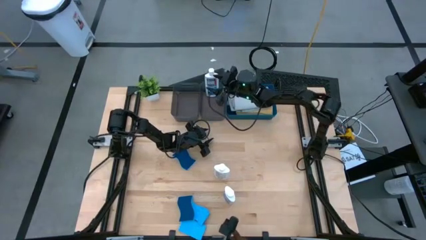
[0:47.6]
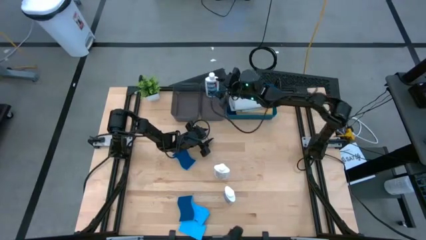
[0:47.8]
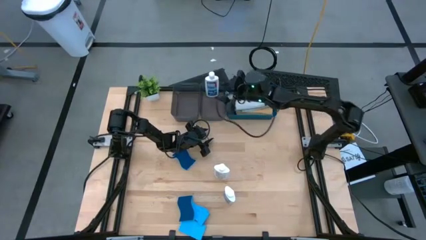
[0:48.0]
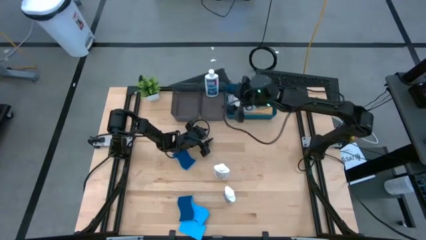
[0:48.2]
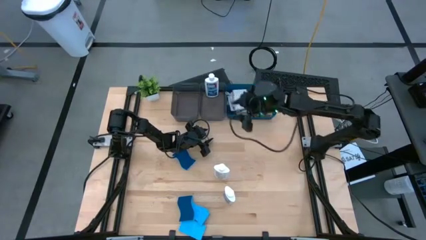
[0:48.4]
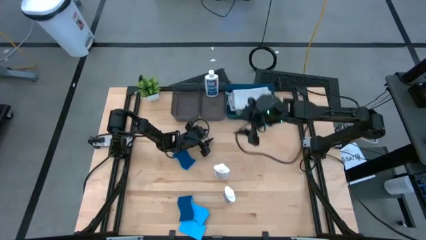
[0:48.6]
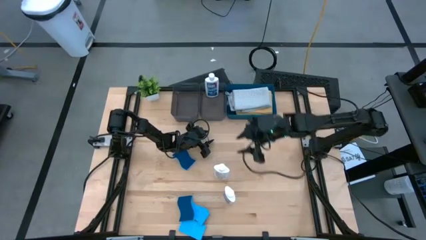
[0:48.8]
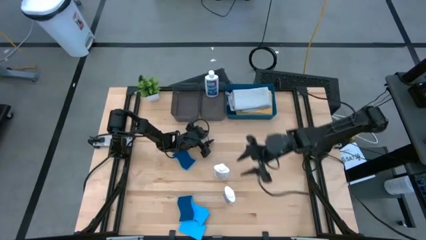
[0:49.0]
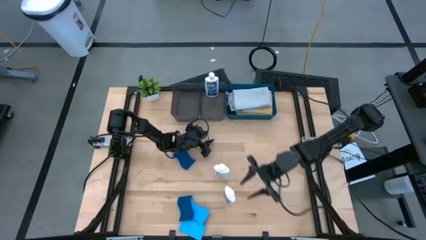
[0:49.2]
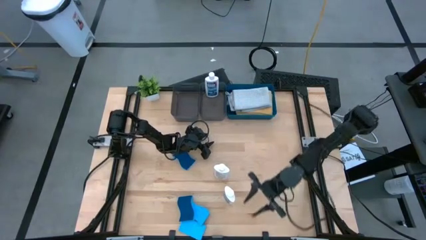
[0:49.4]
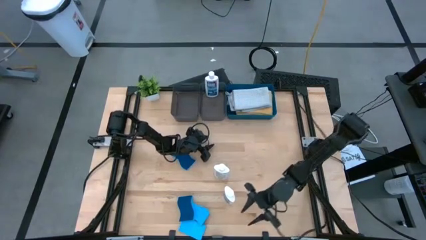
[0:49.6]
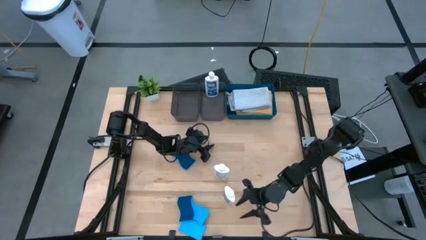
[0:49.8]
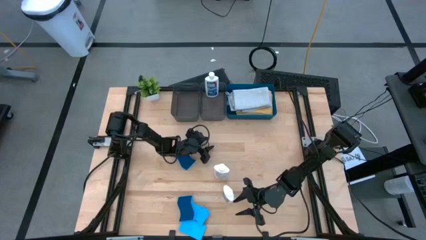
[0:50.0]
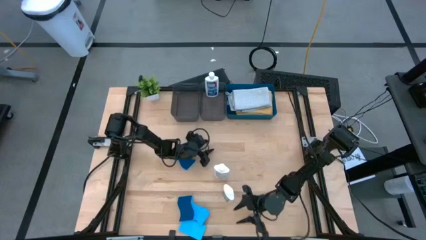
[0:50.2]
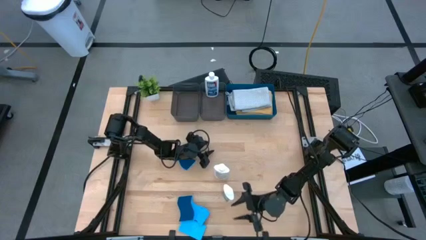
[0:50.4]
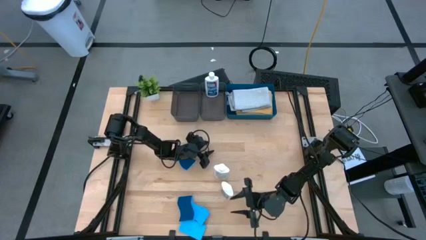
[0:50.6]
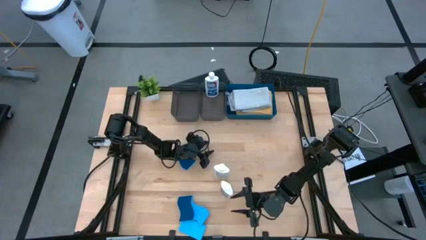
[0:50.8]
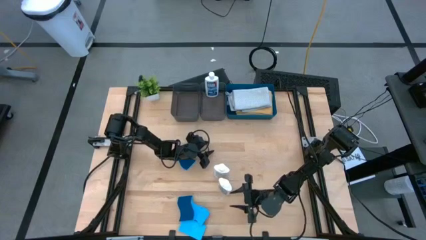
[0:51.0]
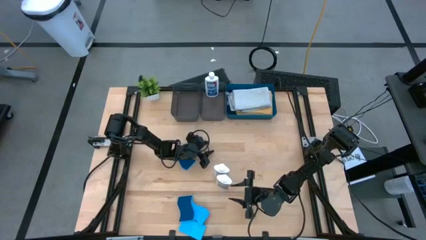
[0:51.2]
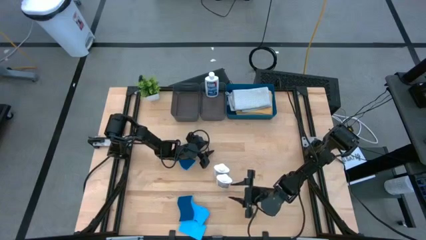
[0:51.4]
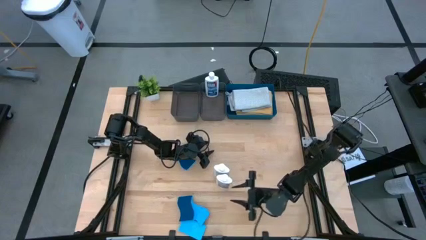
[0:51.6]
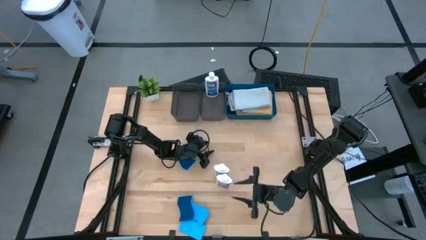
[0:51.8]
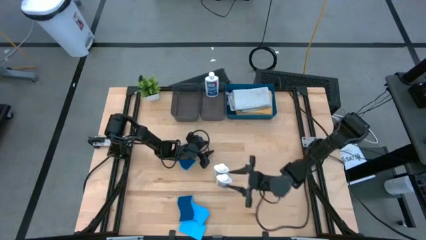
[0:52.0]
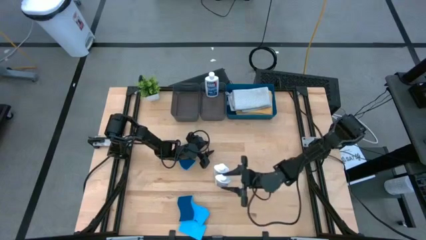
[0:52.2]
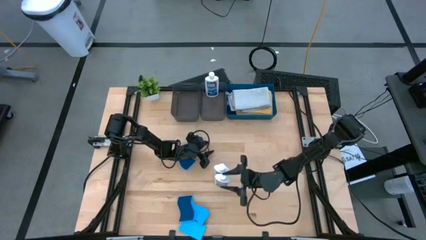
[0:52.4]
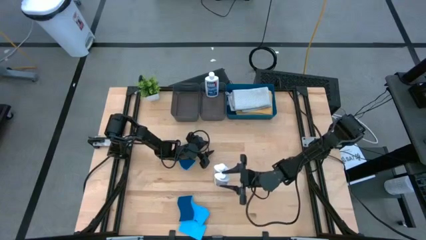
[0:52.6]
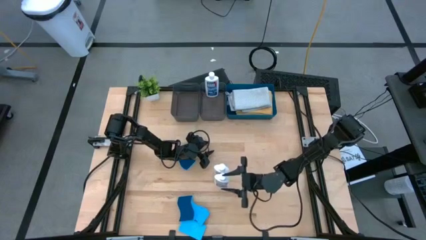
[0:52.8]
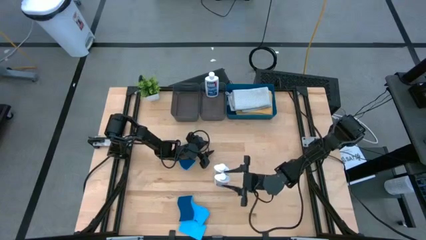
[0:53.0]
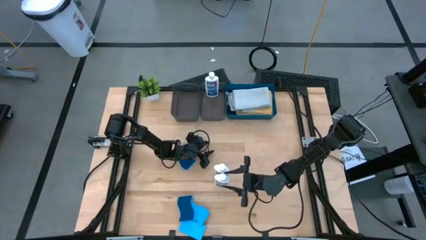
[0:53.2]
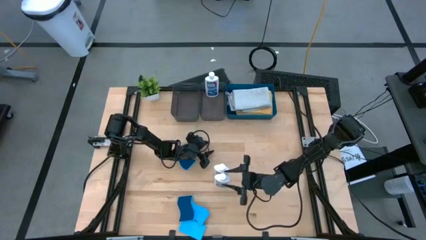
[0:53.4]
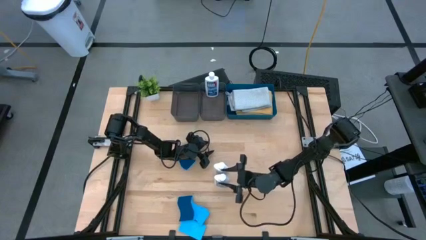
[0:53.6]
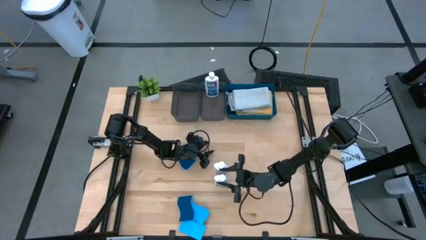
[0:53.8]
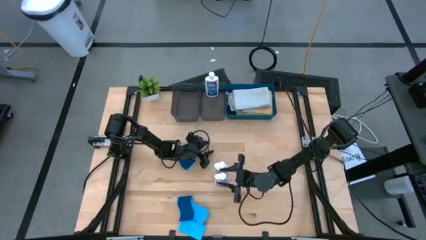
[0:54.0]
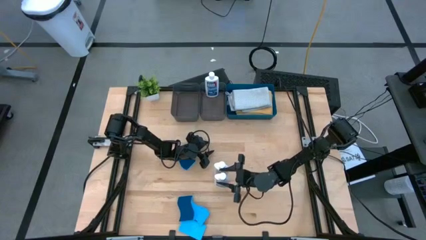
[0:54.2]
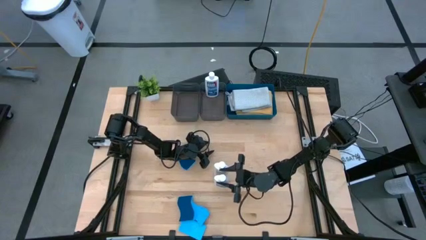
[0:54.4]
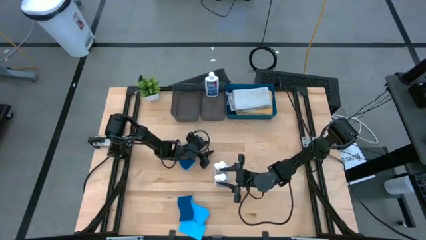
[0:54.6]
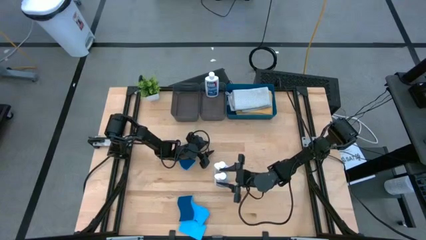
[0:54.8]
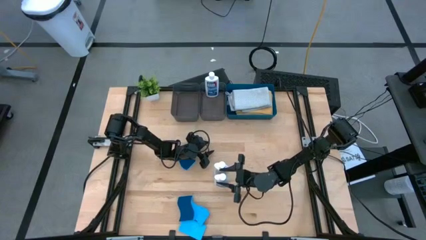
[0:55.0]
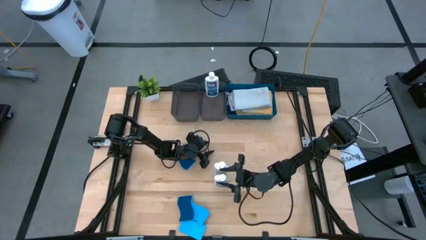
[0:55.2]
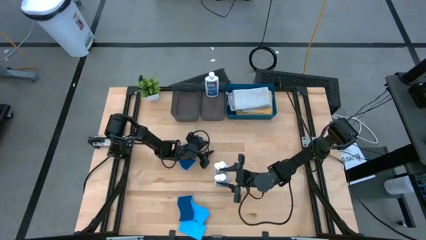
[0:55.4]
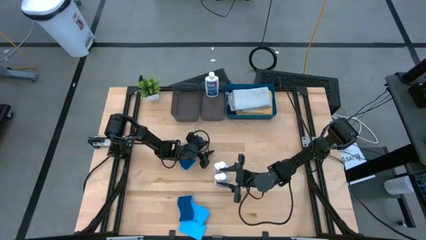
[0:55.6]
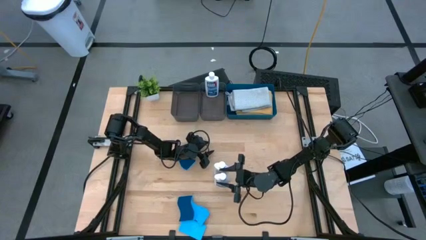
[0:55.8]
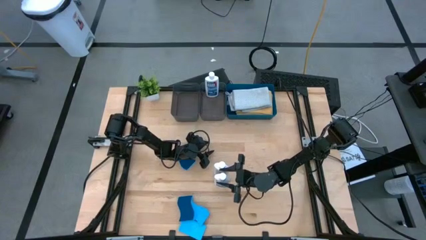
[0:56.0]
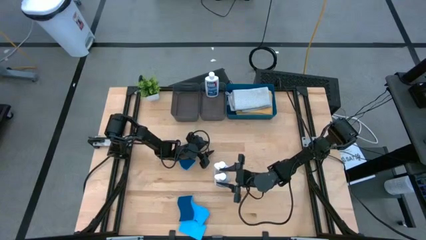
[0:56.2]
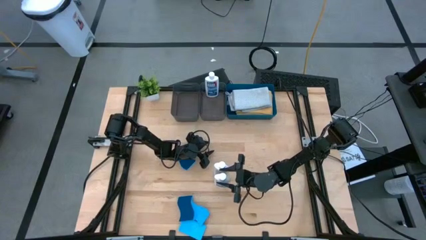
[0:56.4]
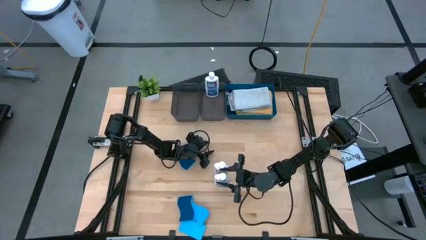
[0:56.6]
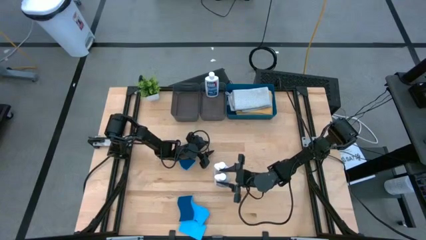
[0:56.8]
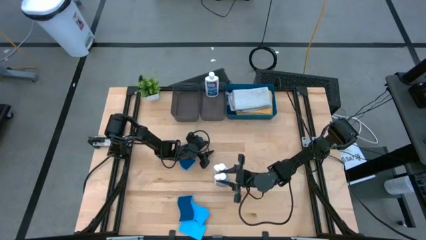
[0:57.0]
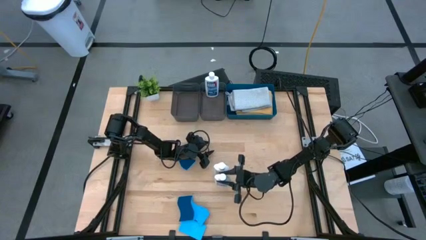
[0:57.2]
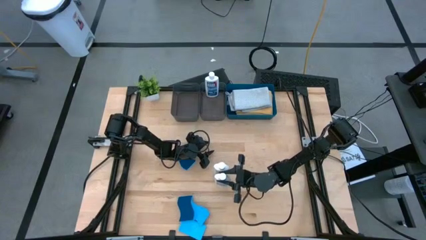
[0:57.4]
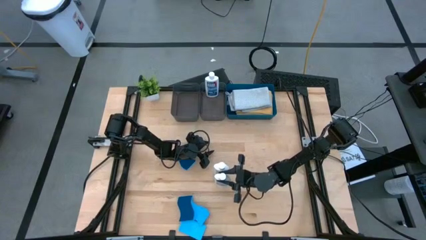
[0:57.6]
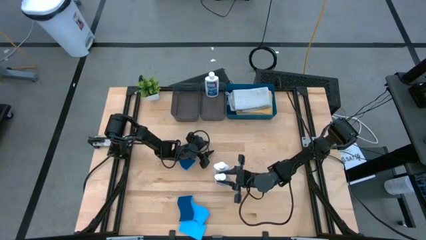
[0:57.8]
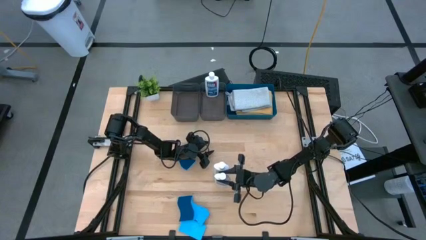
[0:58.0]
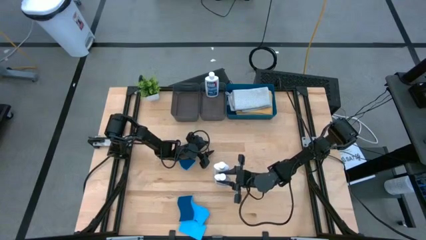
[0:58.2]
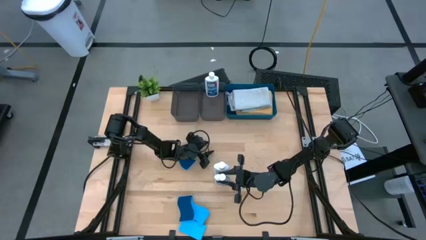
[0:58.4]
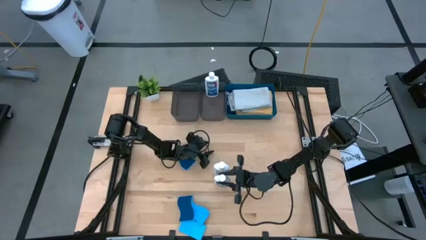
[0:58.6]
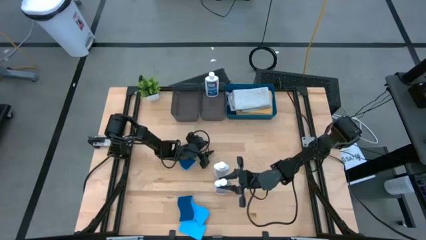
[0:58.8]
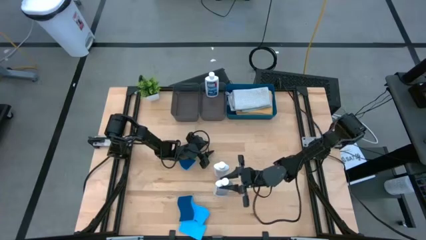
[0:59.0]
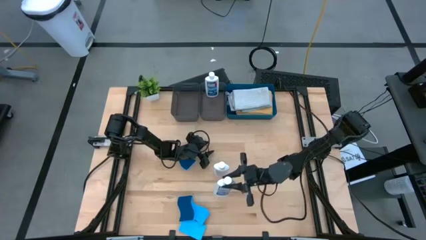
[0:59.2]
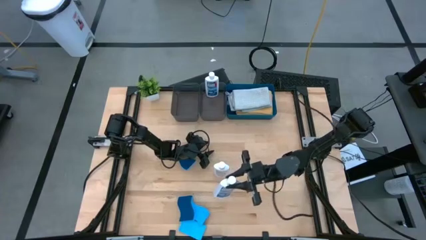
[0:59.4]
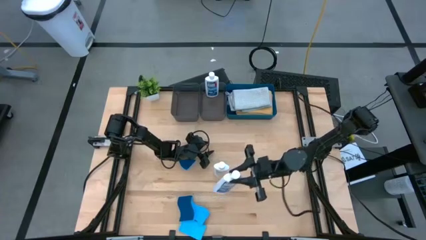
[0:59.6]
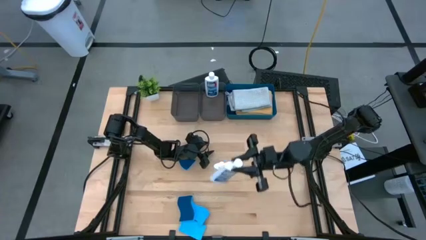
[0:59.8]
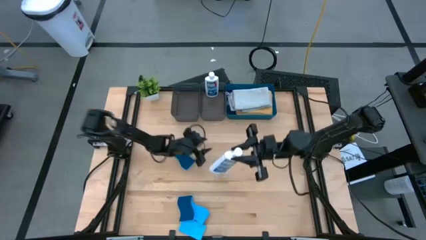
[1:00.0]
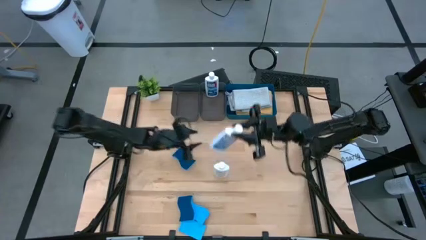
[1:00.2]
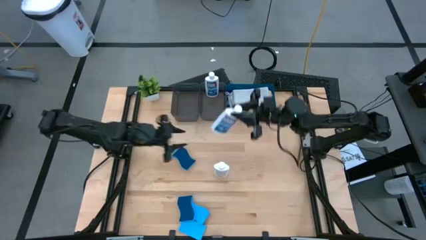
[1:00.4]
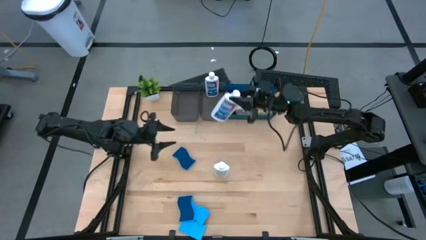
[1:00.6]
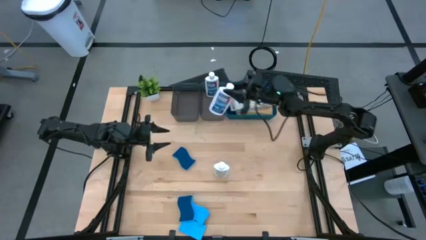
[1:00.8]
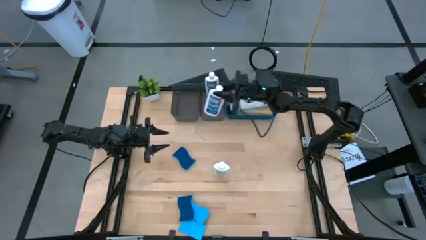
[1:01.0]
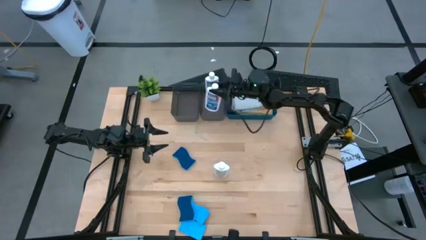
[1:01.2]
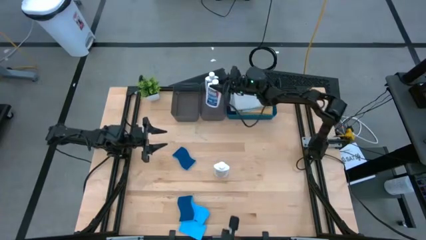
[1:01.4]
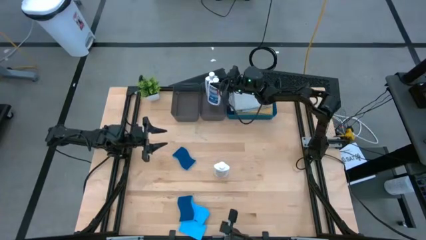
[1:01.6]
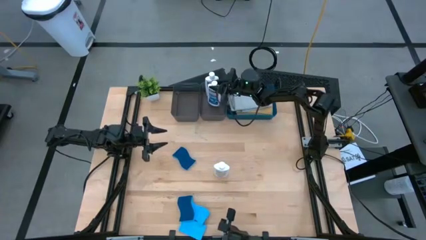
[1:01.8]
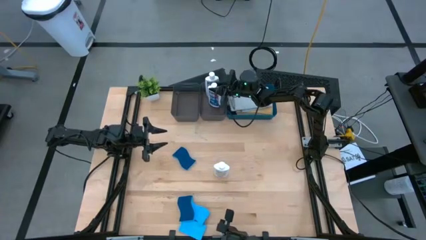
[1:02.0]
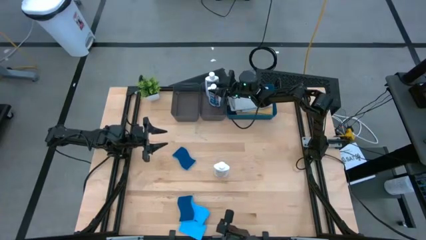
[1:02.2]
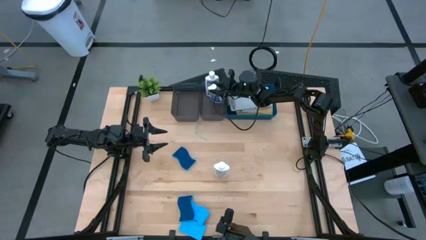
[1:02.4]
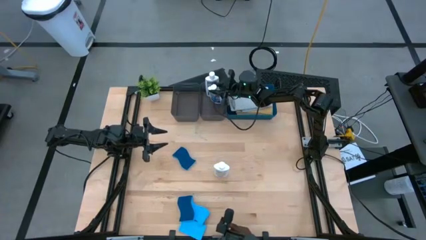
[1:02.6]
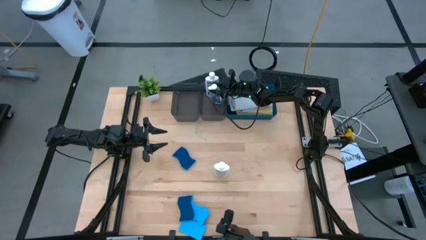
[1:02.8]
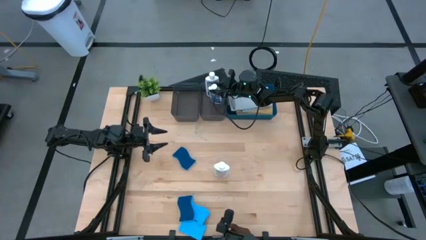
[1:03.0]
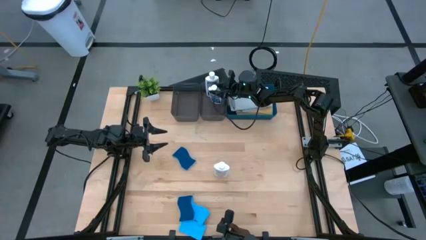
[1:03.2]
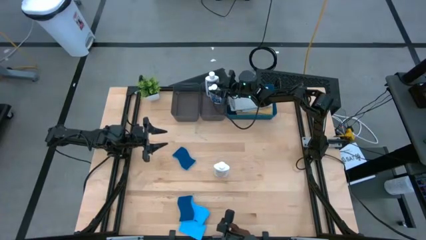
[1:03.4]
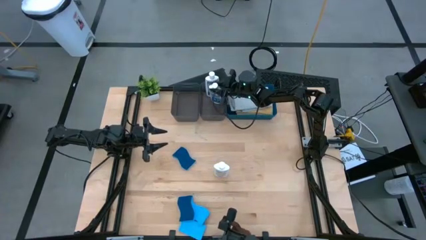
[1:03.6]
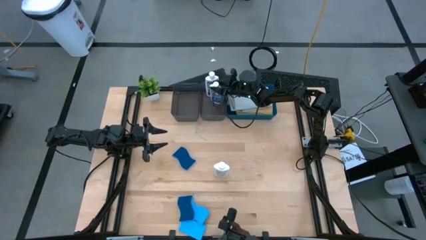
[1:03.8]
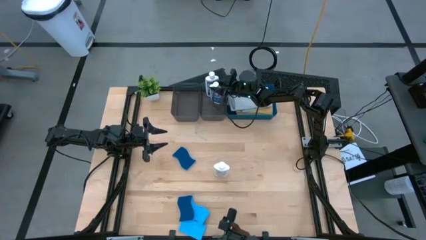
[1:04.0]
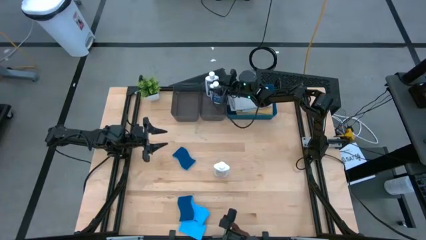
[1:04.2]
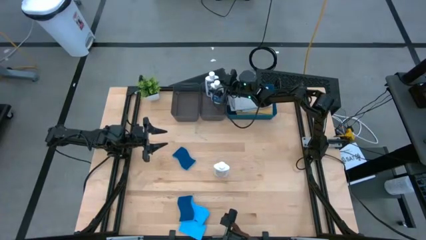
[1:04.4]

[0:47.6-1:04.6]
Task: Pick & Place Kitchen Items
Put the bottom white plastic restorer bottle into the right black bin
